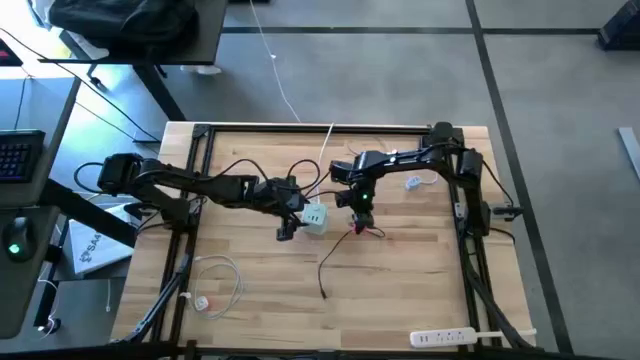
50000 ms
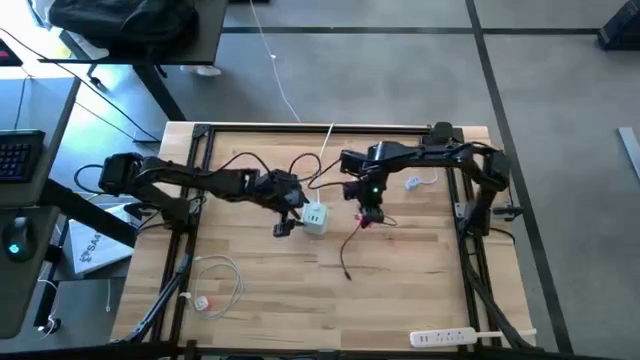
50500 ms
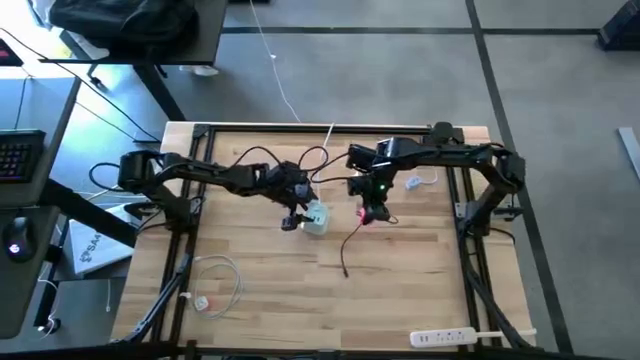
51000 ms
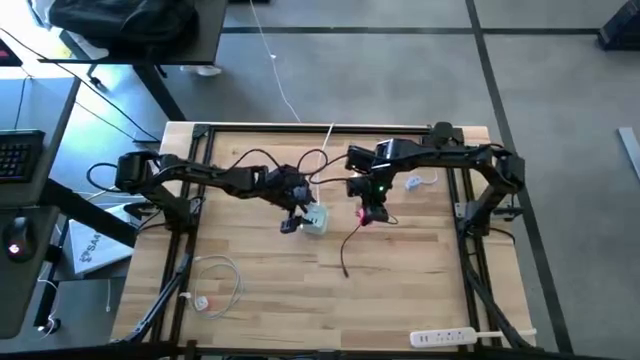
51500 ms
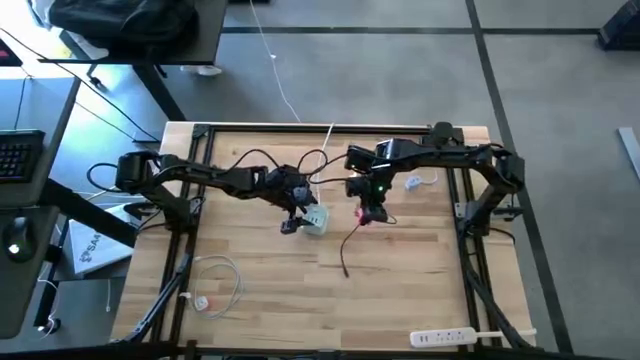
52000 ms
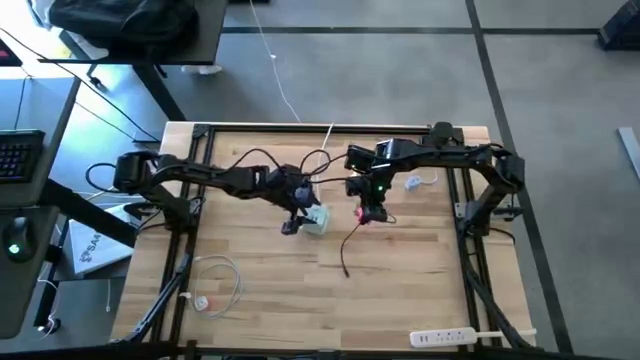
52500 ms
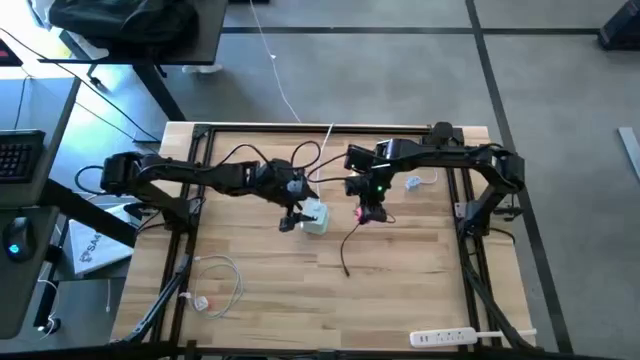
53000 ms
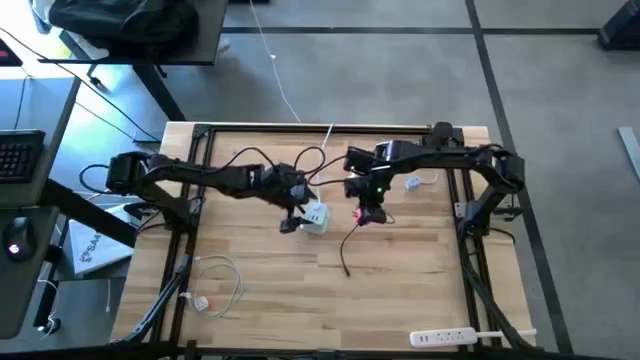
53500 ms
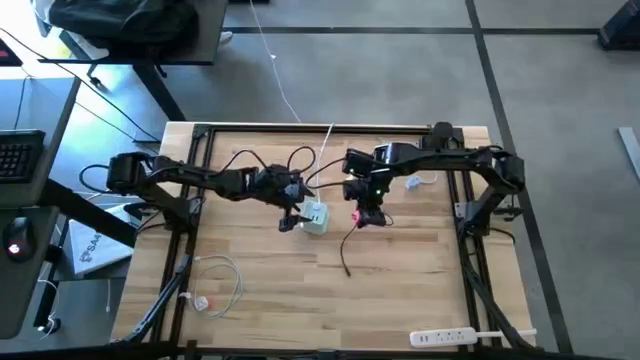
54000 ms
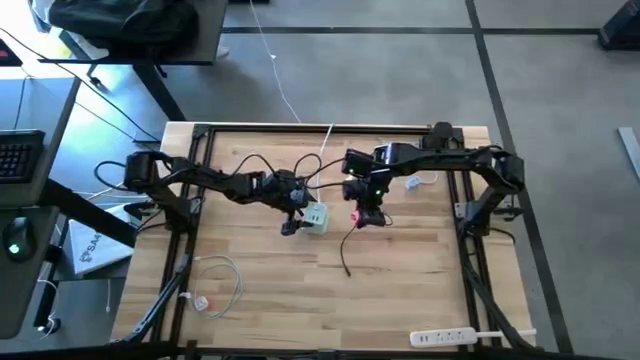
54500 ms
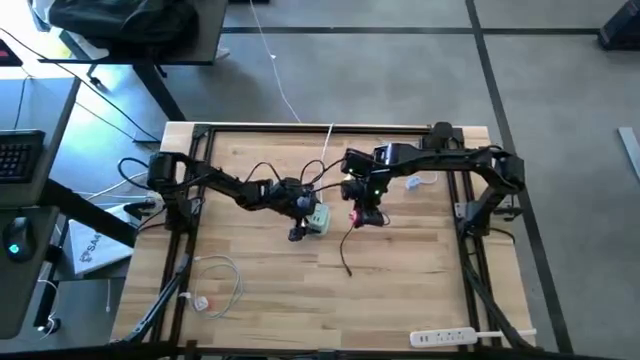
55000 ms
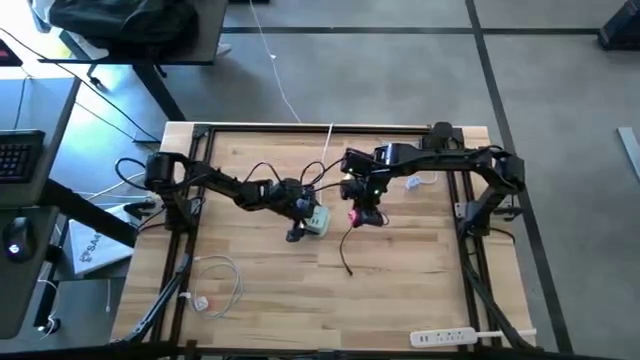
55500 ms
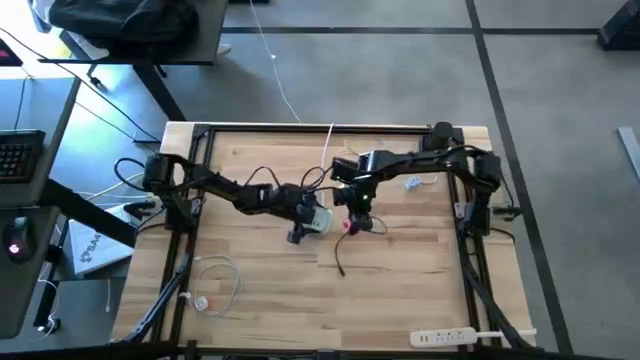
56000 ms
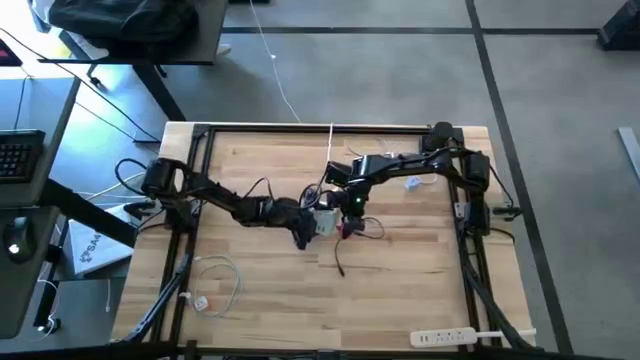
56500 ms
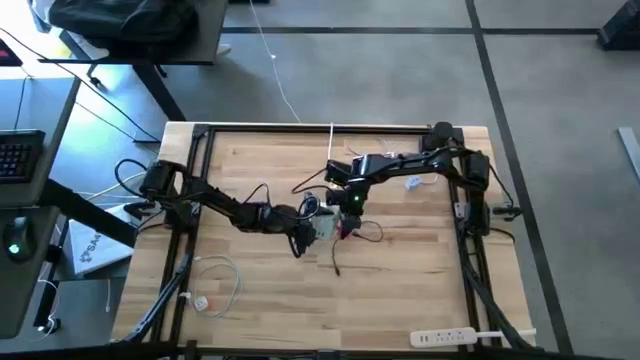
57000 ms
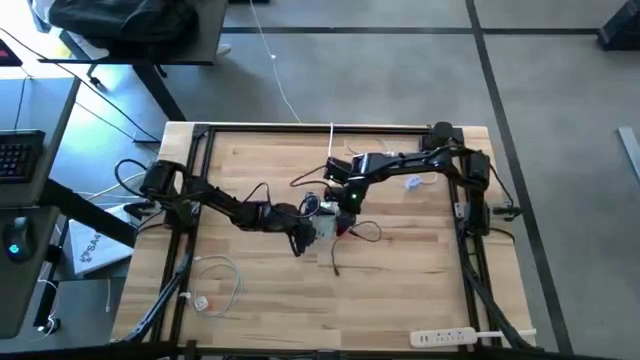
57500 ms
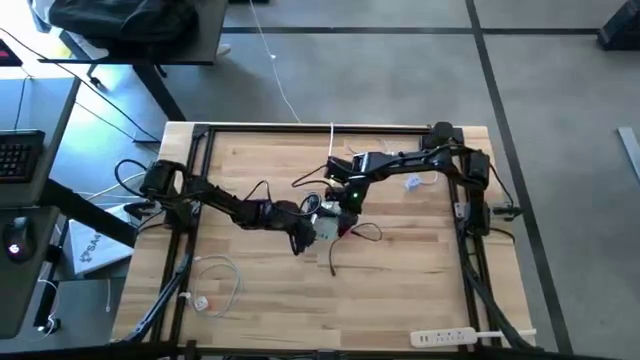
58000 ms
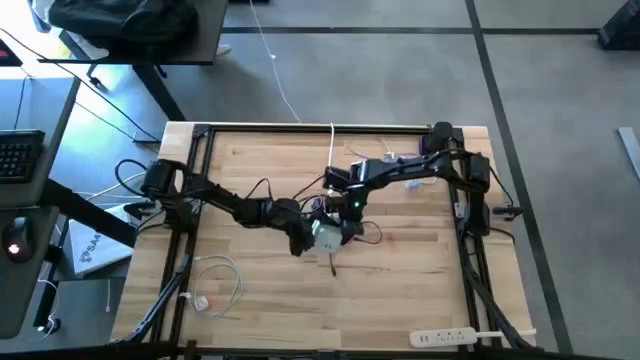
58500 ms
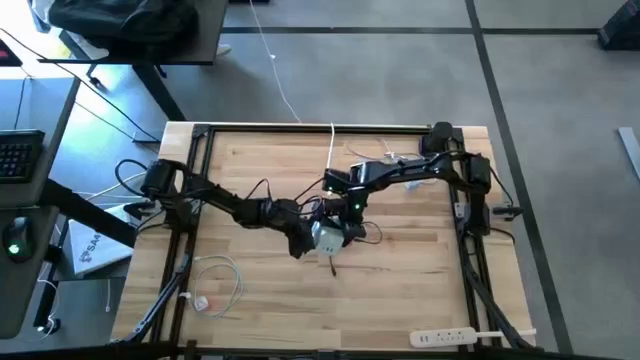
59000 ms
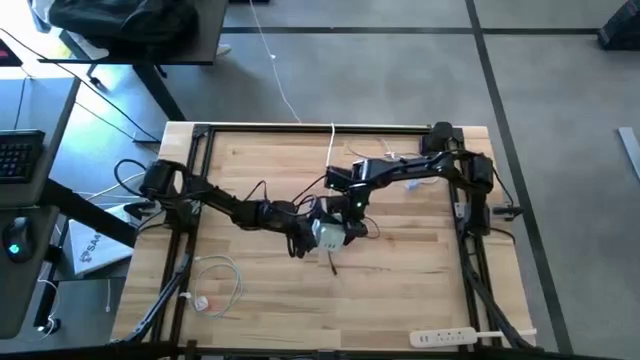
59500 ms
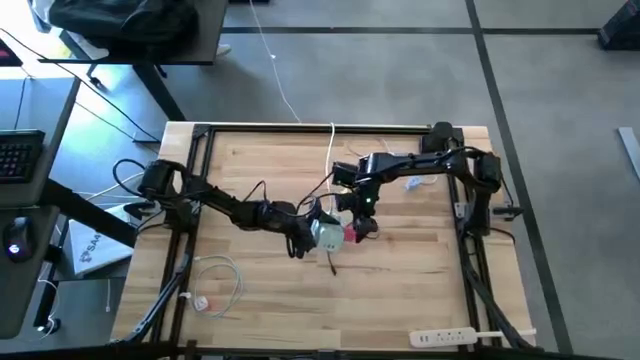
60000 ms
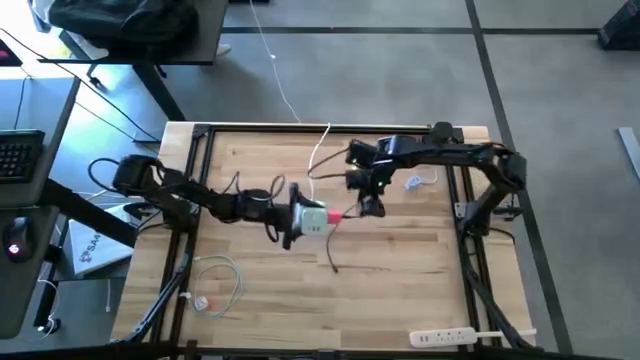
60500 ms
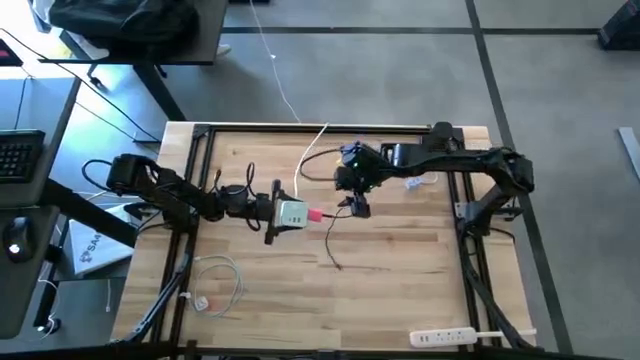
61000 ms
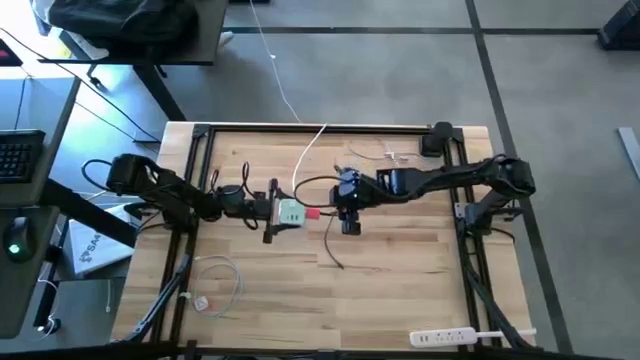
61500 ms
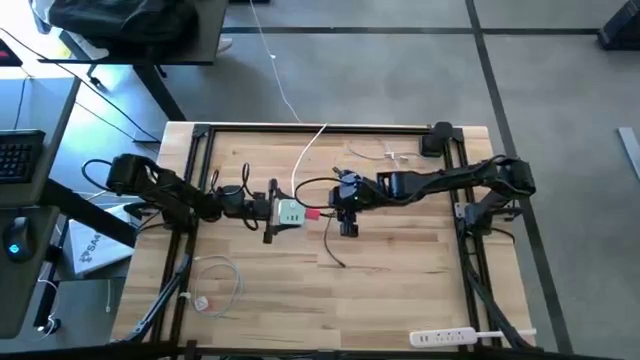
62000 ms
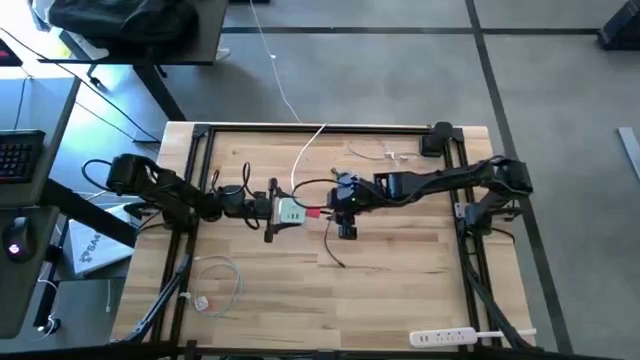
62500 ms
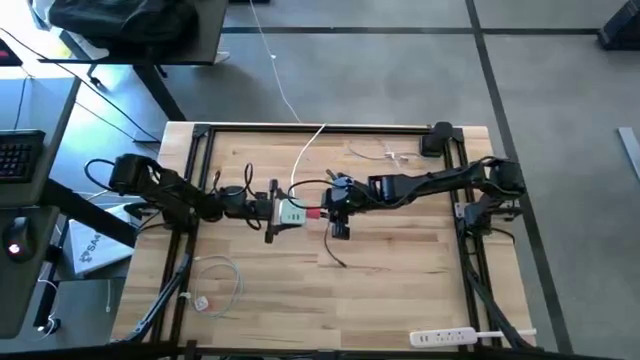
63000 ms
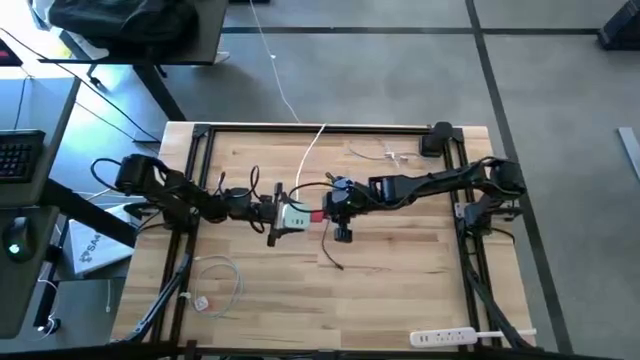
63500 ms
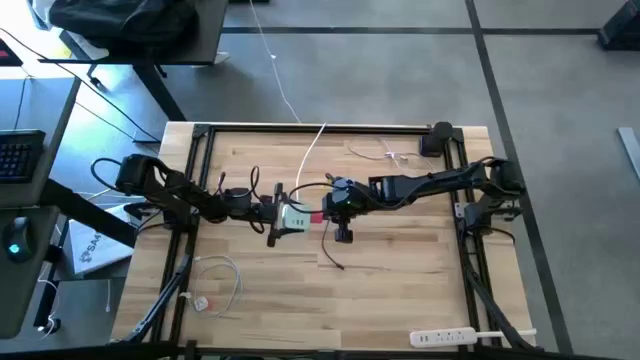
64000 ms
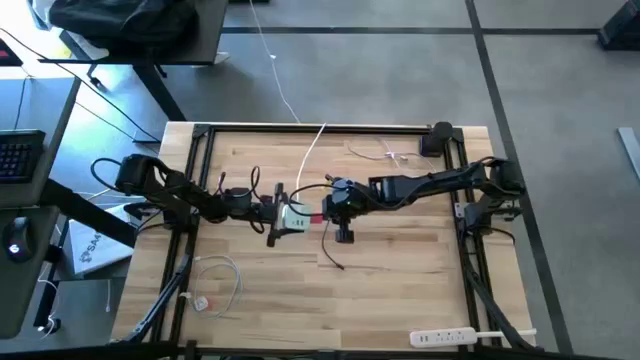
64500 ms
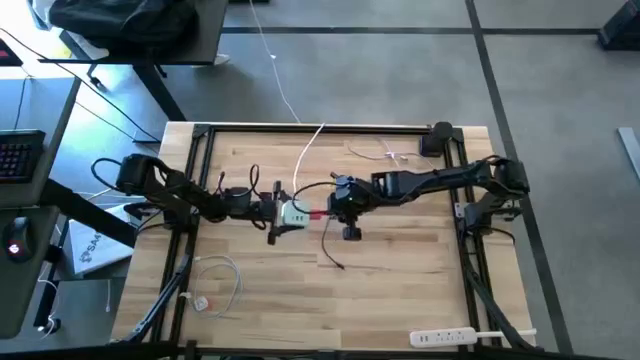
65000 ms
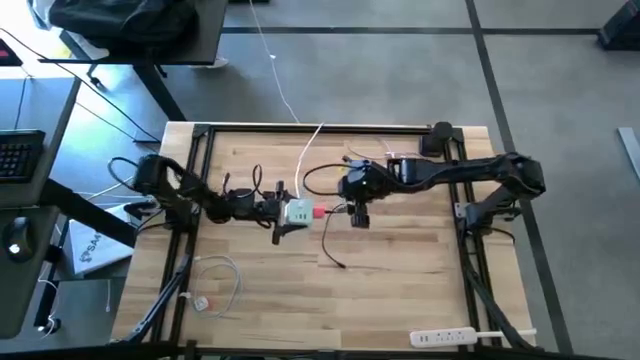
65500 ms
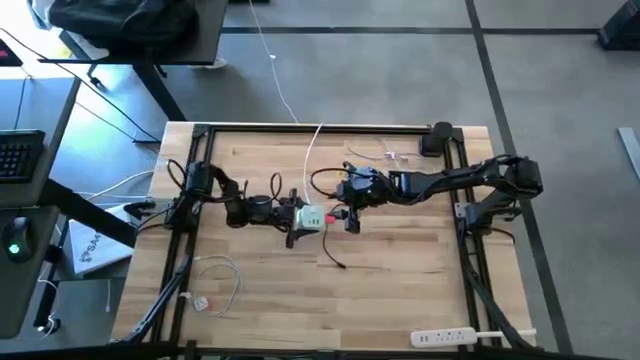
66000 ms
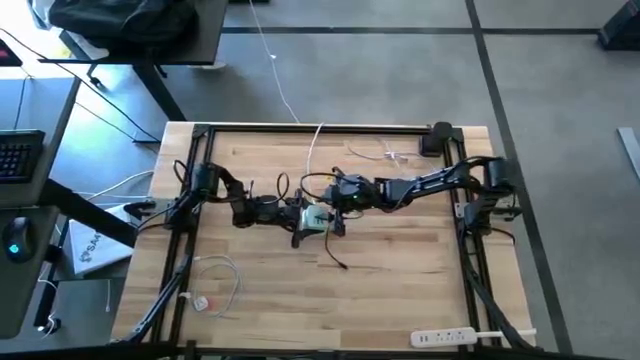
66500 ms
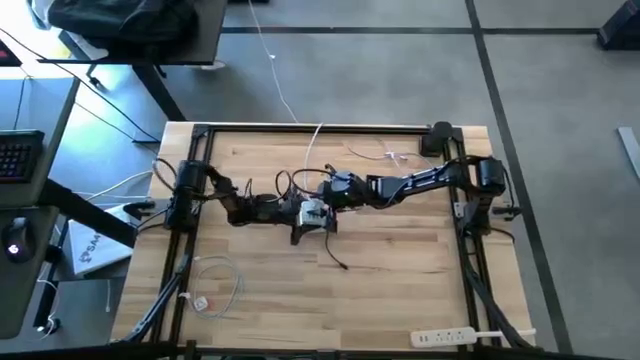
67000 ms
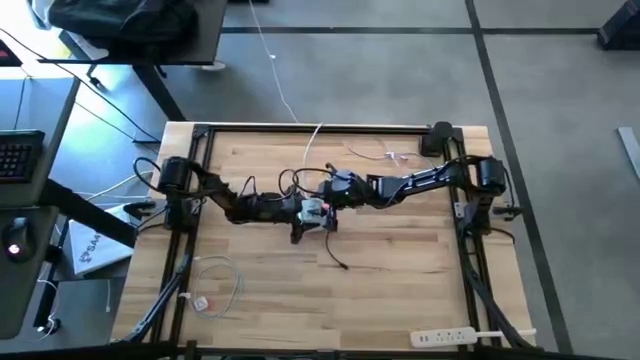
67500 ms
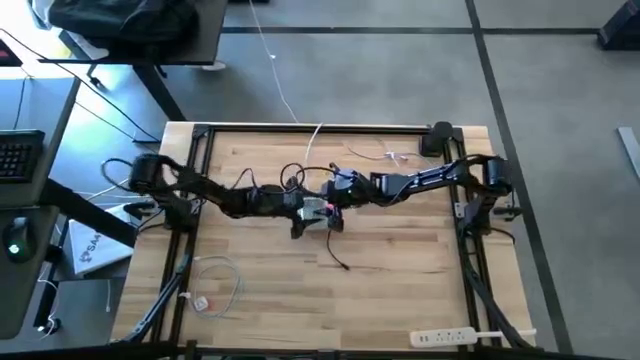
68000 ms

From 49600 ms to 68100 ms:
Task: Insert USB
Insert the pink charger adapter into the top white outlet extension

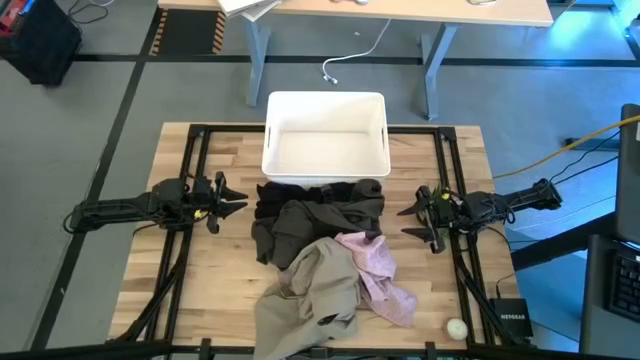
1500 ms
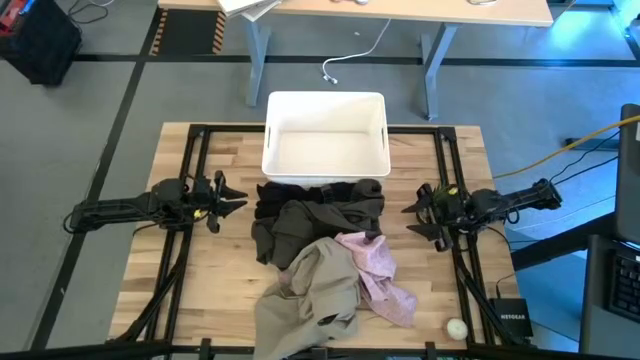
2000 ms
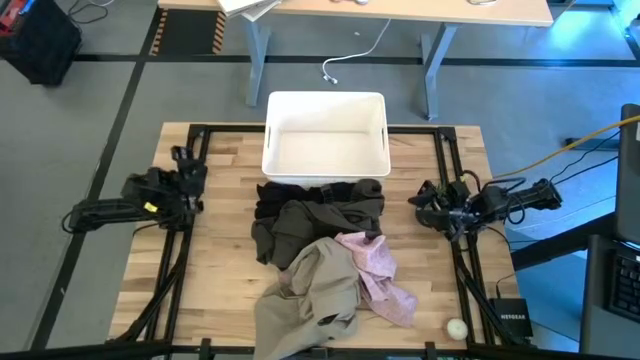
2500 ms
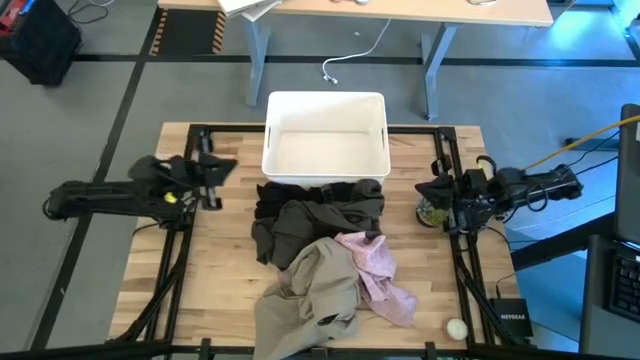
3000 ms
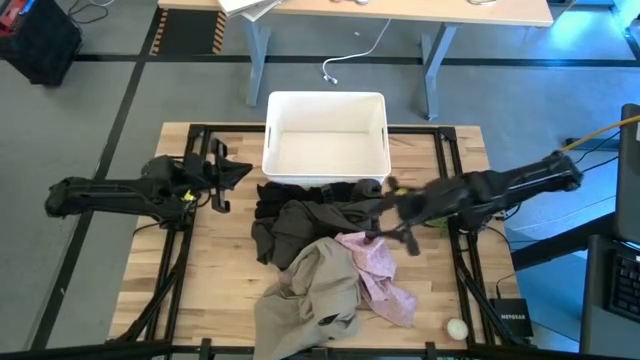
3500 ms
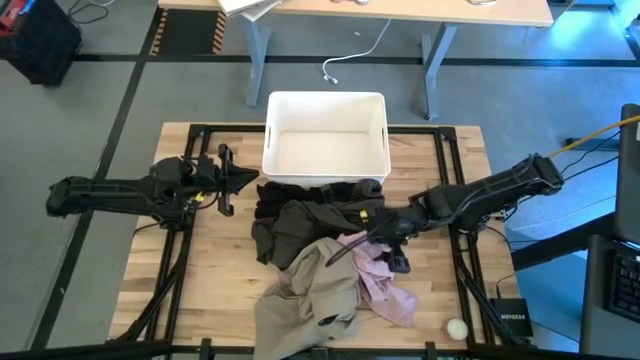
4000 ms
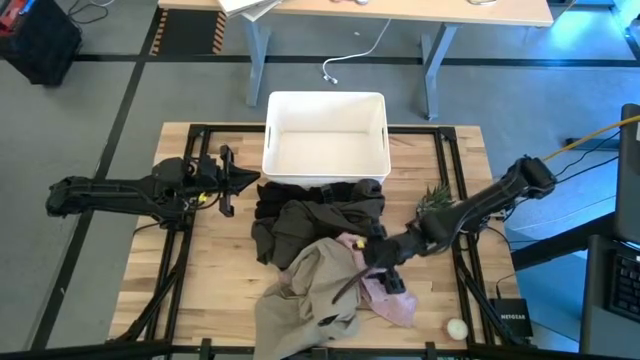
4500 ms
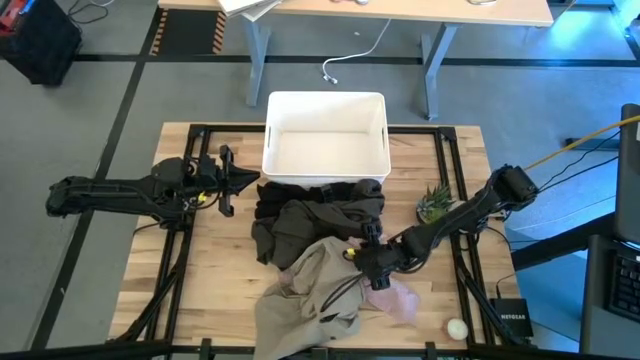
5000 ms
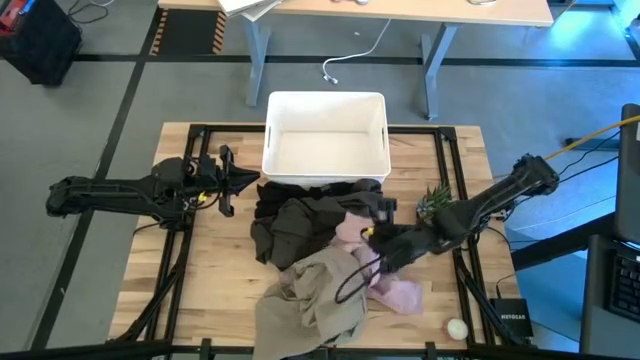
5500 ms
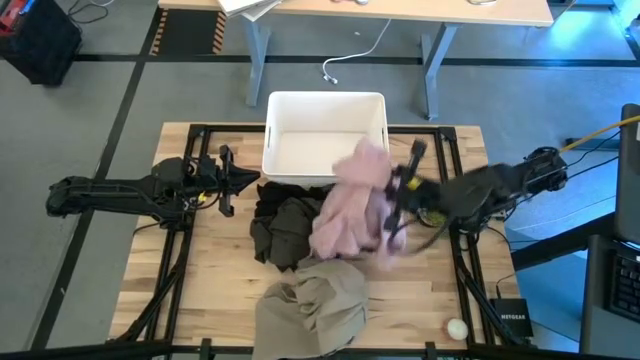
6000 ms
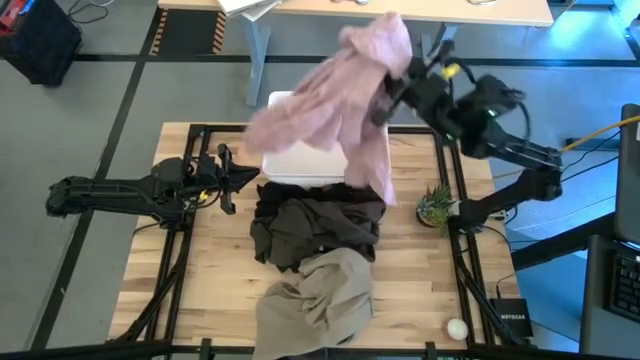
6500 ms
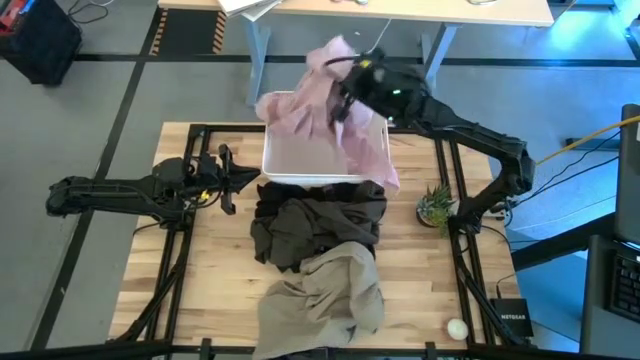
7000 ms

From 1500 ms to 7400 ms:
Task: Sort clothes
Put the pink long sleeve shirt into the bin
